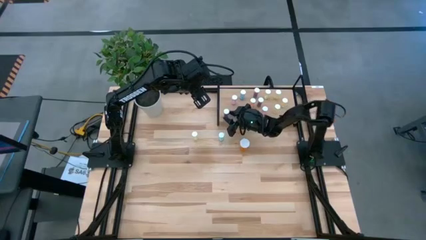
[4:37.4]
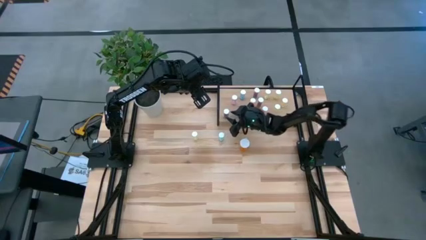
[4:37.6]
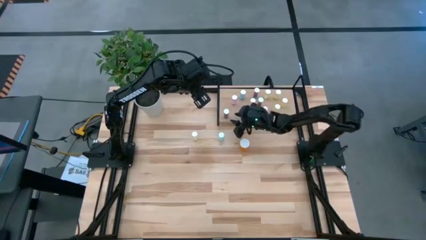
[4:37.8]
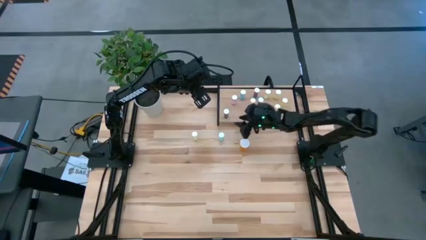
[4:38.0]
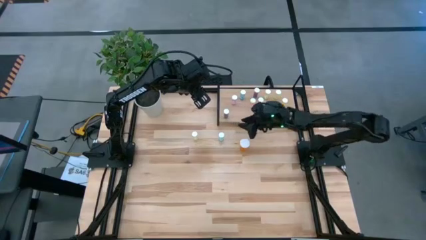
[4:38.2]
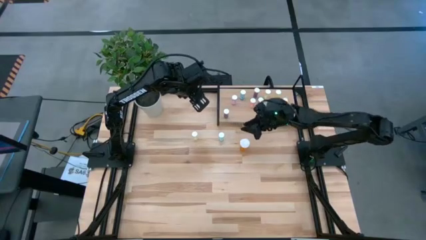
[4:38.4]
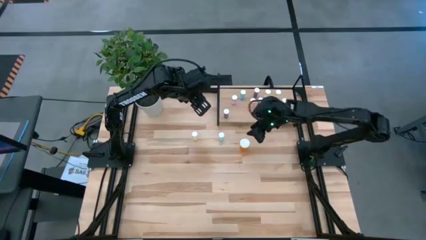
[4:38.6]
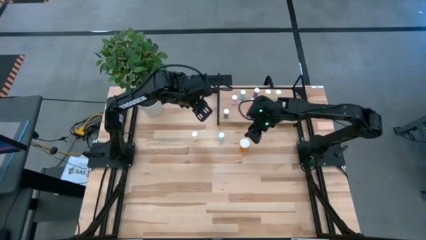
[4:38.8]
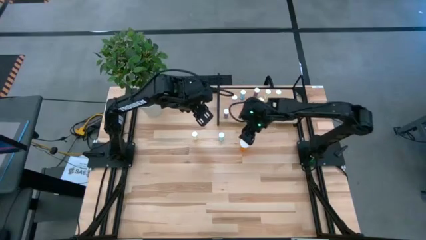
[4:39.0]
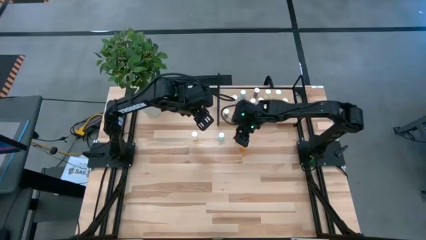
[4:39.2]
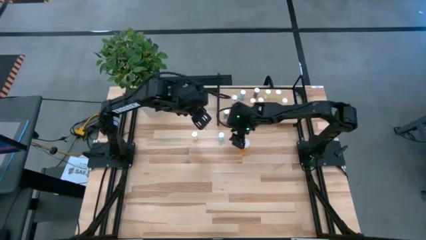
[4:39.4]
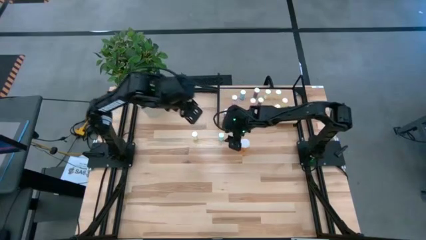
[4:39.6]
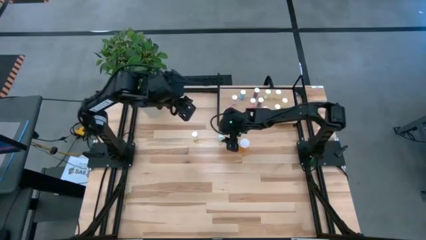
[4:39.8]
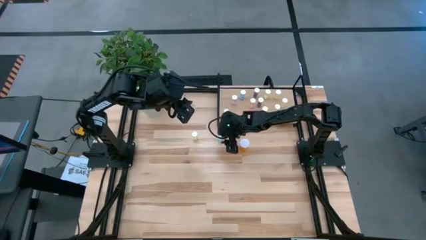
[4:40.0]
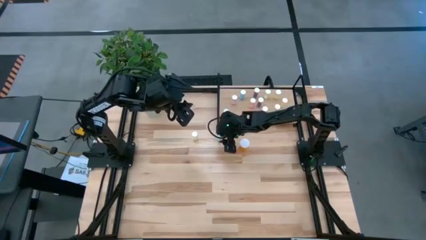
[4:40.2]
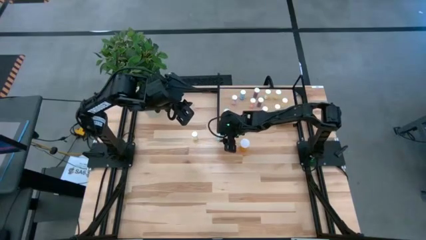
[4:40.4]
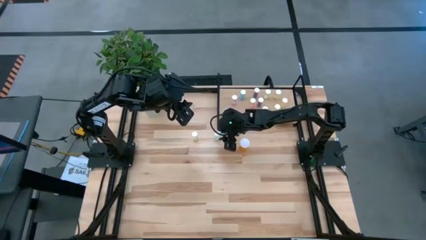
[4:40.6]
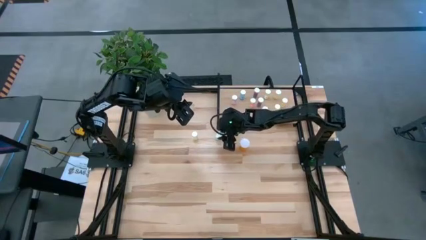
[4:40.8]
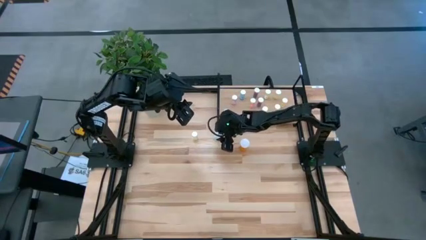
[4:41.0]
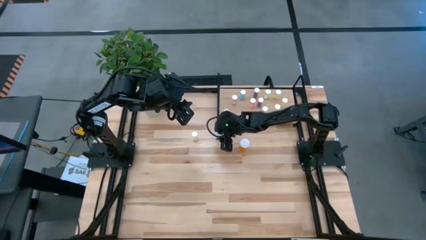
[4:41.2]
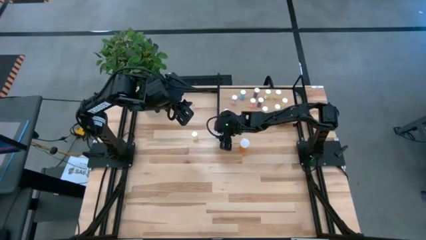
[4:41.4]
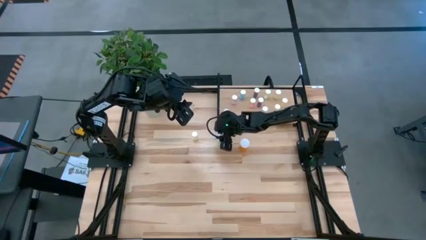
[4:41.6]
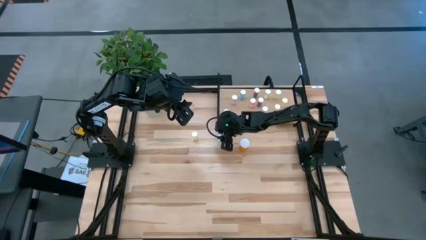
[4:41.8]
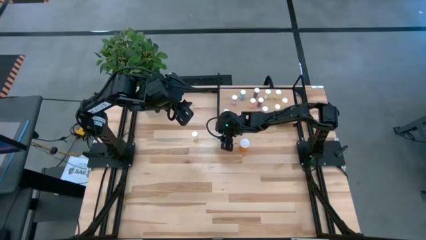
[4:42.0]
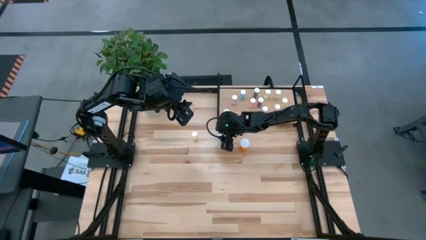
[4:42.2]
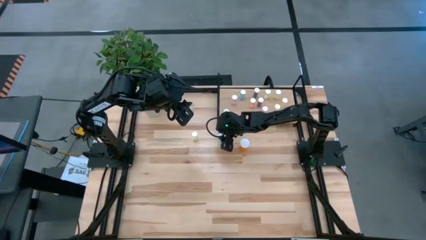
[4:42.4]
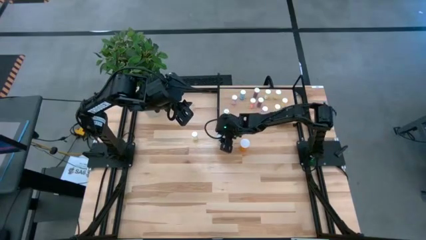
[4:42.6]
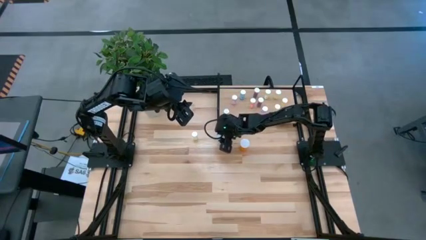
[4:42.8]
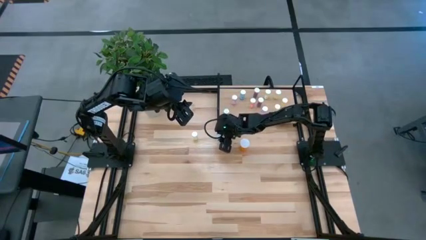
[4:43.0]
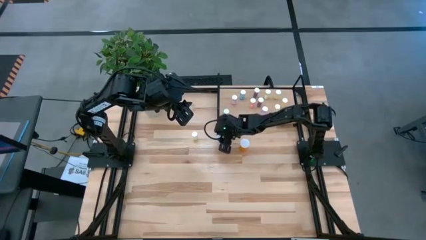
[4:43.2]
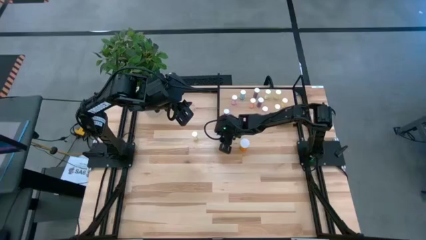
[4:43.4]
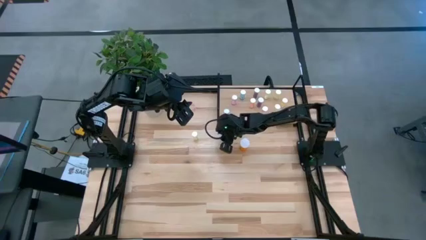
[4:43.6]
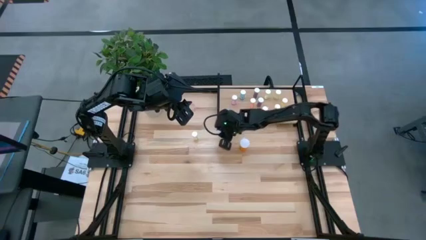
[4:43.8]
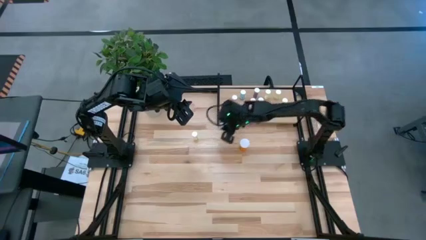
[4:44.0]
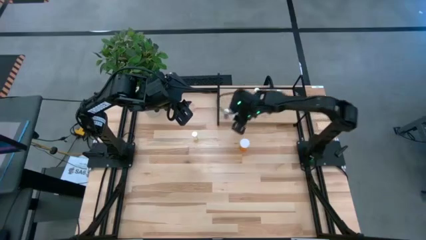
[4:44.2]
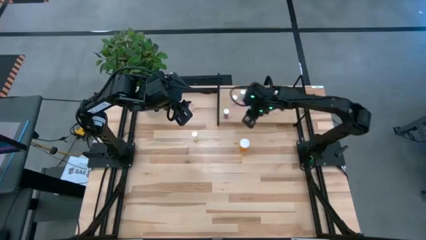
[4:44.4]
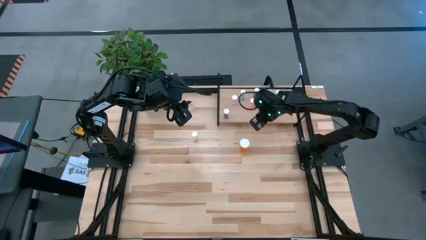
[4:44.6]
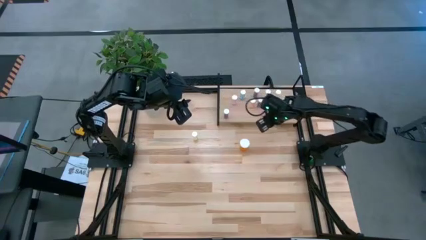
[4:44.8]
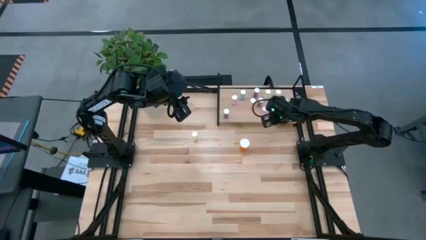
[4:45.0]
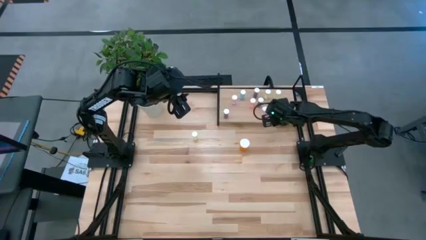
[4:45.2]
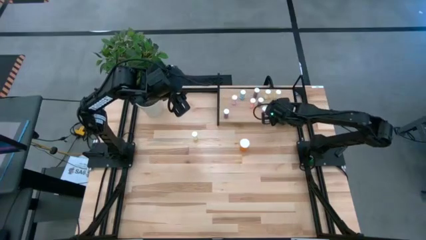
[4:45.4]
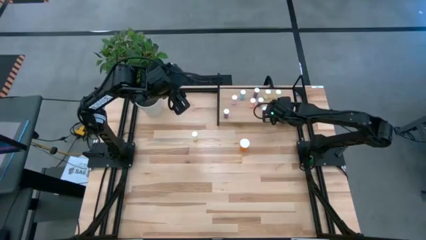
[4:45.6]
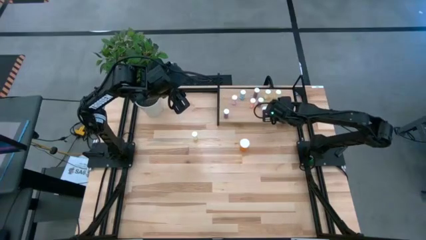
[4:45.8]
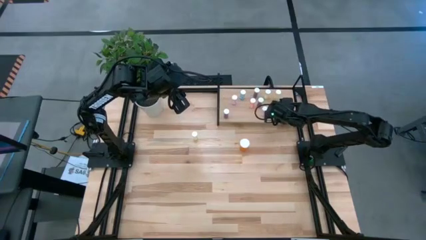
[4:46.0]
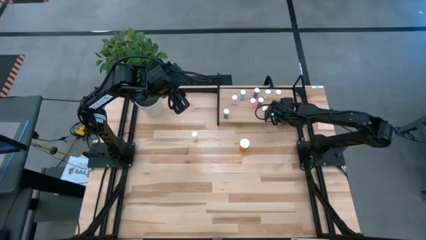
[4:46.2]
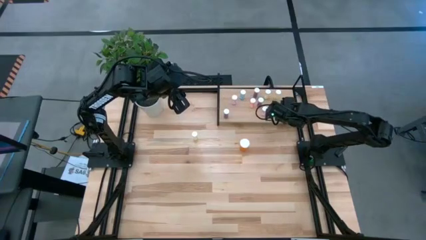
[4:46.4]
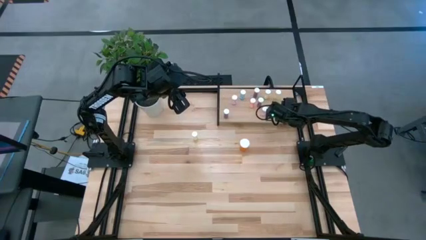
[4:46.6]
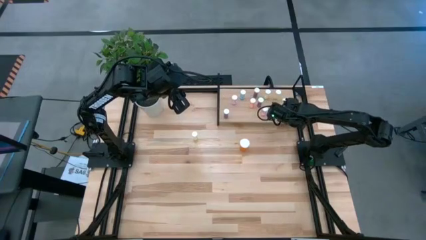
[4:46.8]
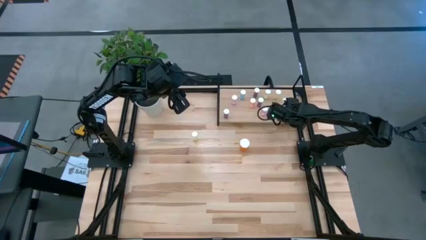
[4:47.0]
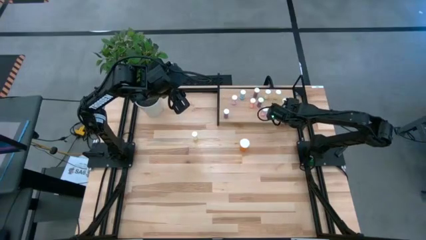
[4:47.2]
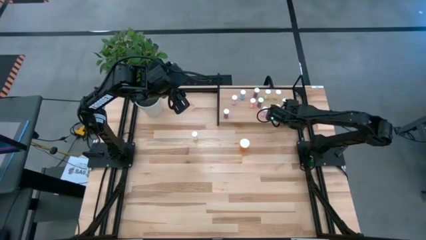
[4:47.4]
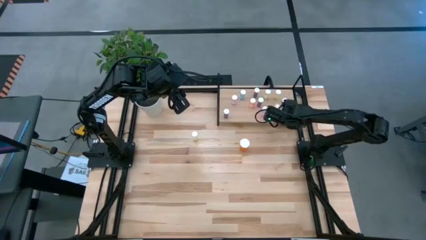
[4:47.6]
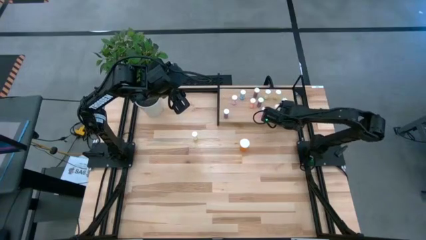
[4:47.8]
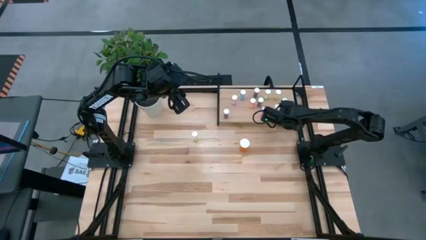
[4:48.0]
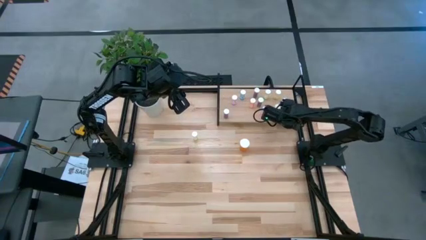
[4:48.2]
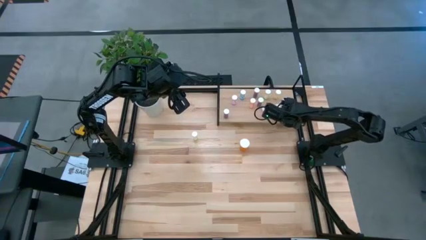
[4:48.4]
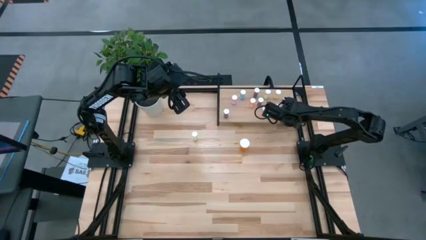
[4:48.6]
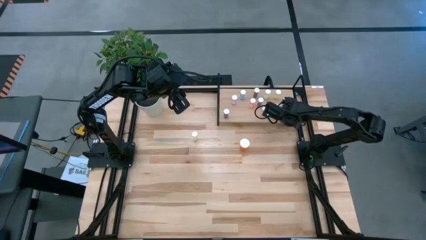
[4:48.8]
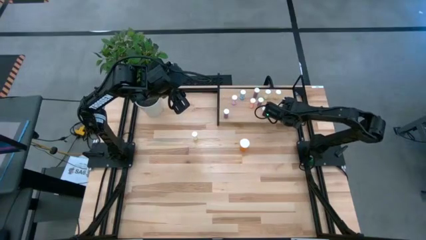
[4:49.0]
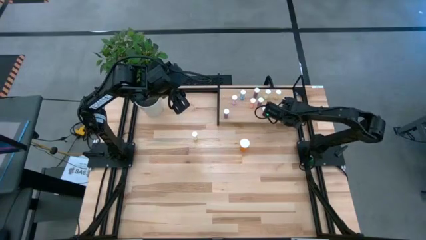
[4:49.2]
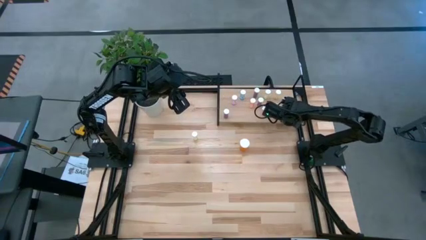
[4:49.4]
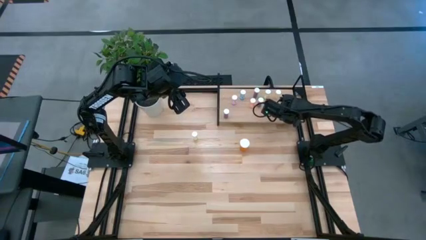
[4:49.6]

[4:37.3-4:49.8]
Task: Pick and place medicine bottles onto shelf by color
Put the blue pill bottle on the shelf

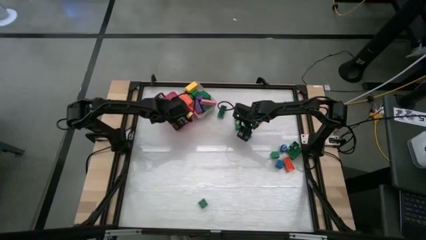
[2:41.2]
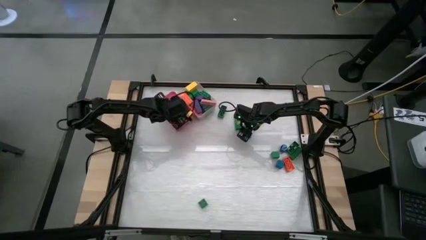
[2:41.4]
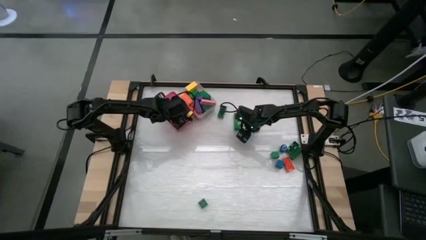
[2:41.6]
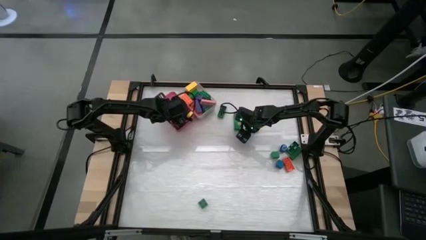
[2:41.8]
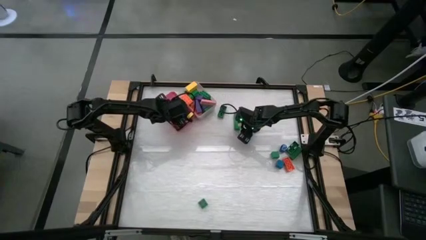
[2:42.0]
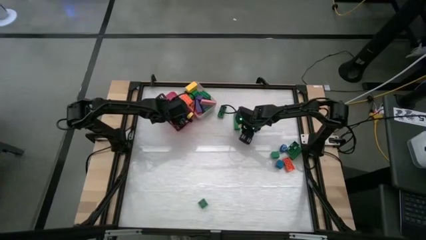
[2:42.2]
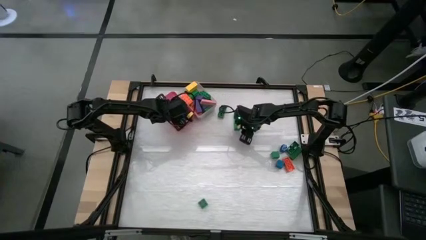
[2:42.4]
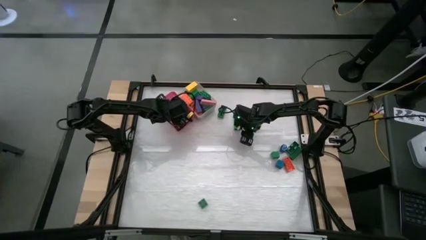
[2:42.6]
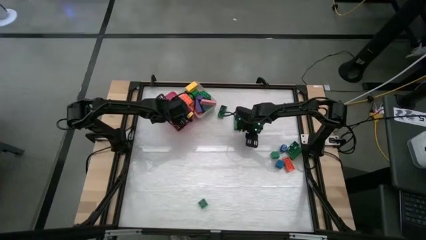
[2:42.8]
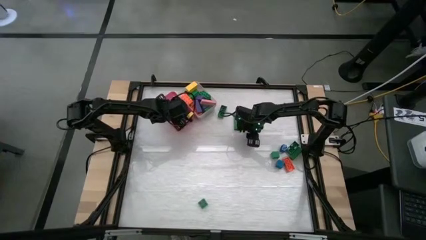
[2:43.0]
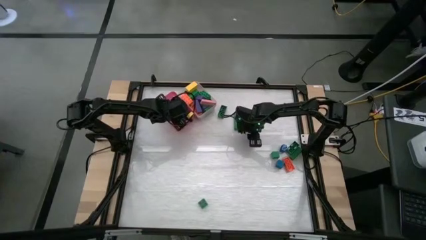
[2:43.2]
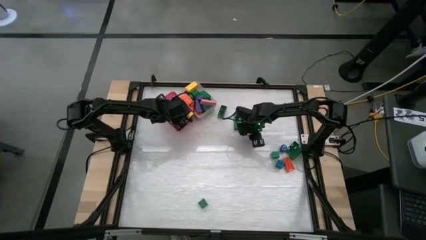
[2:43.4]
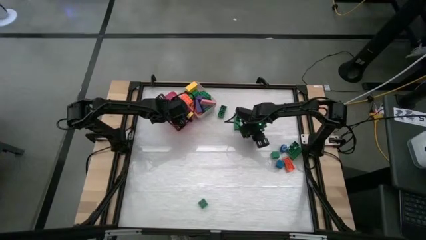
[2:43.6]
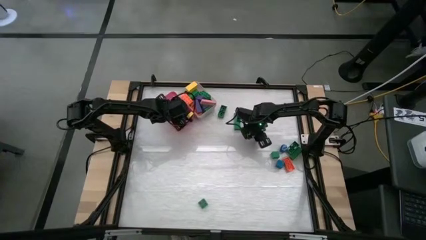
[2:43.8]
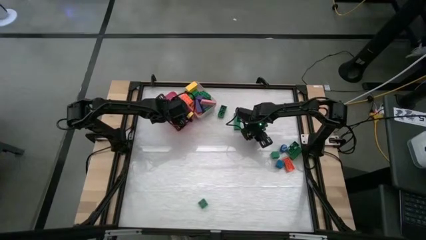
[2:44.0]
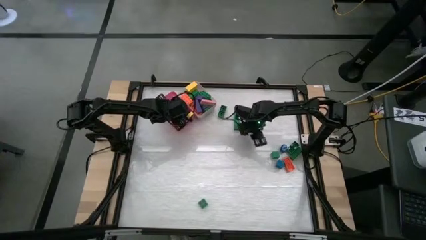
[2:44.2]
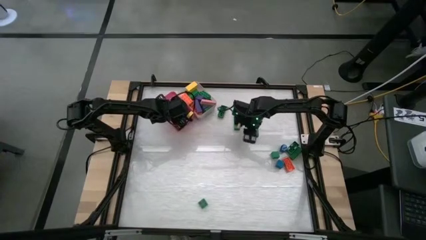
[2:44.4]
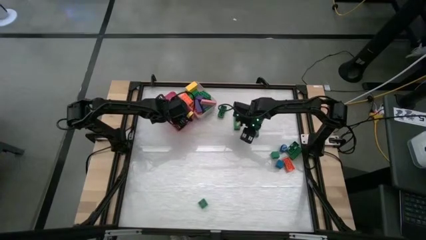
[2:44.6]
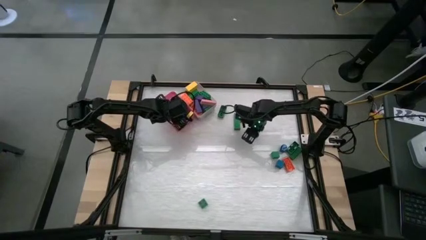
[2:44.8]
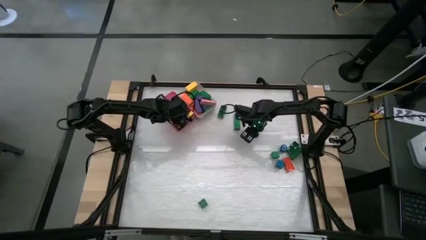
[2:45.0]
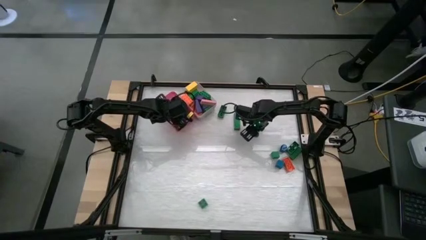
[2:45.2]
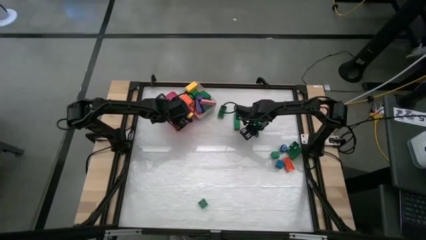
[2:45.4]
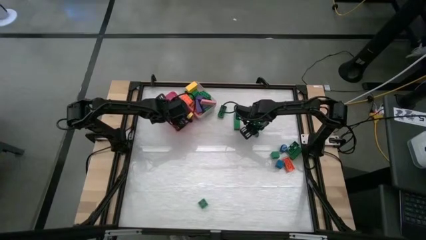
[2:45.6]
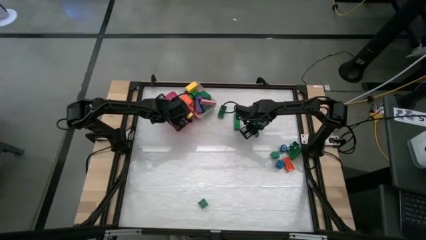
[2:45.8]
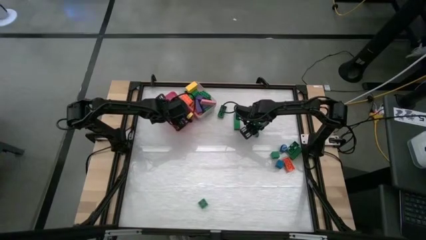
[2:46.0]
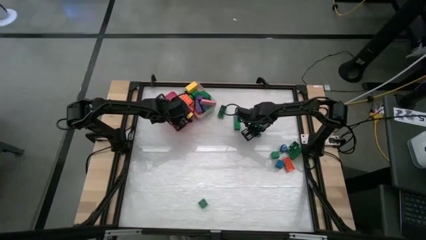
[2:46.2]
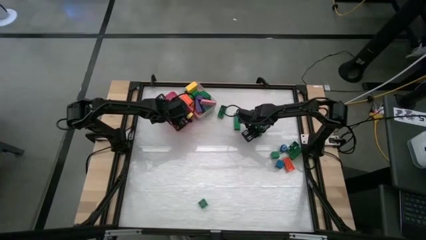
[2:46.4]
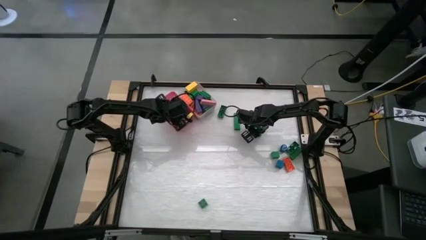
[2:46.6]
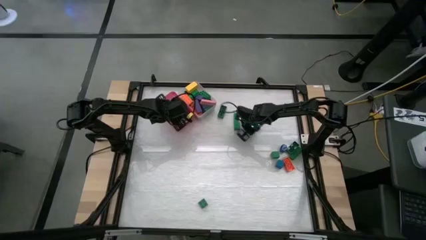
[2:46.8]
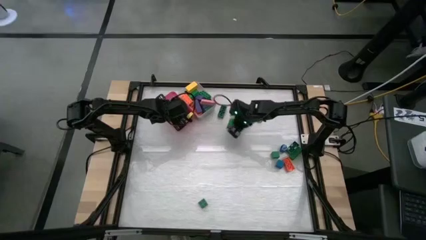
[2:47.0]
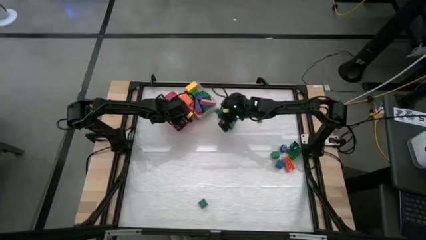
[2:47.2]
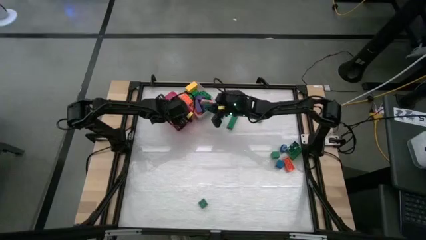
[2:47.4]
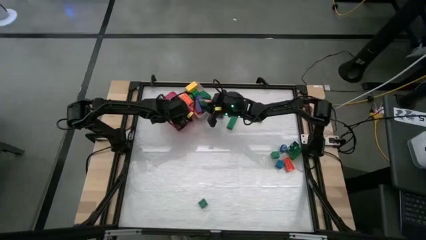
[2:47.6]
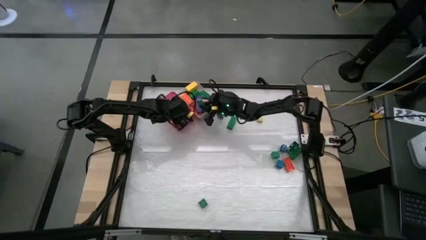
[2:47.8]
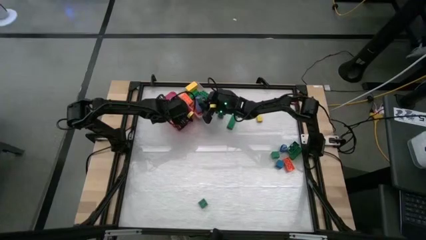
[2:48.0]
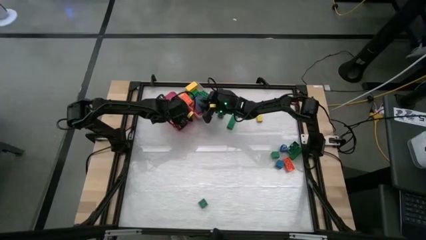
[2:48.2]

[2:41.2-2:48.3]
Task: Sort blocks by size
Put the big green block into the white bin
